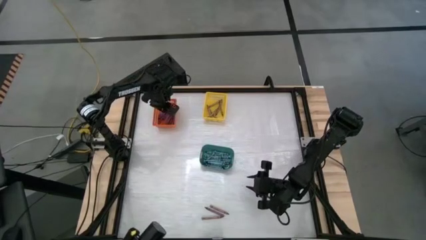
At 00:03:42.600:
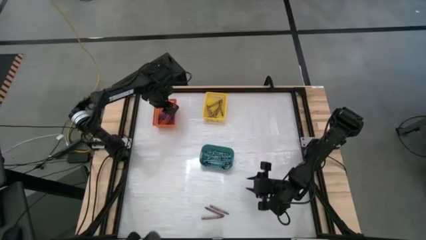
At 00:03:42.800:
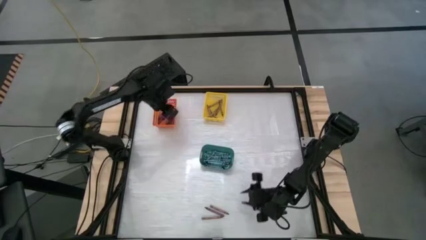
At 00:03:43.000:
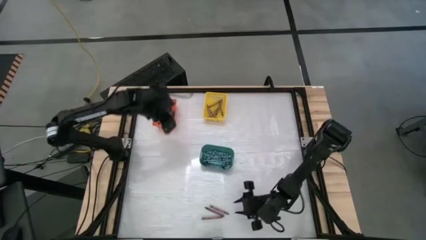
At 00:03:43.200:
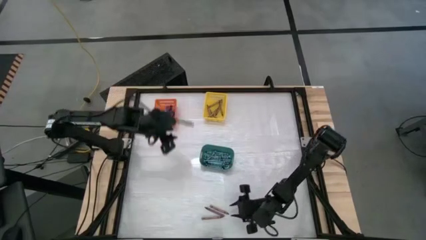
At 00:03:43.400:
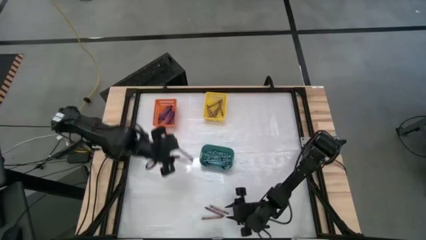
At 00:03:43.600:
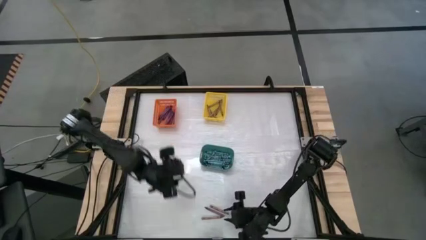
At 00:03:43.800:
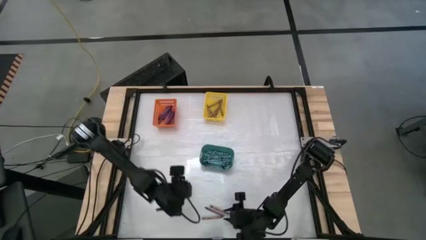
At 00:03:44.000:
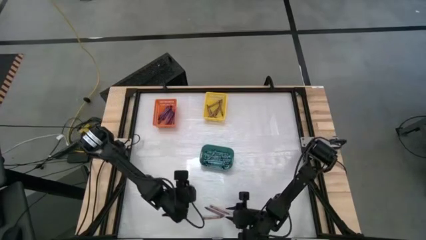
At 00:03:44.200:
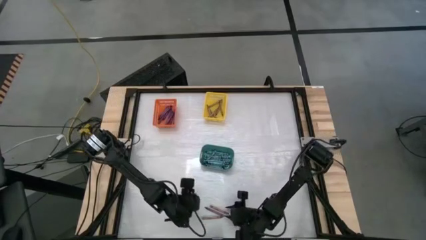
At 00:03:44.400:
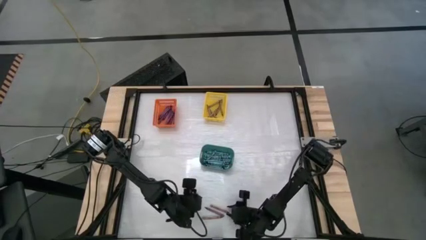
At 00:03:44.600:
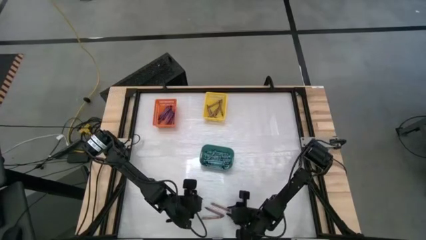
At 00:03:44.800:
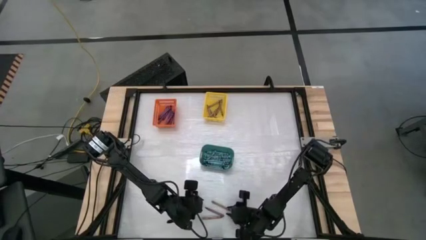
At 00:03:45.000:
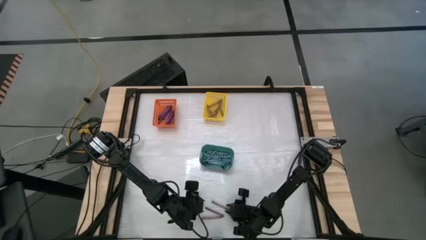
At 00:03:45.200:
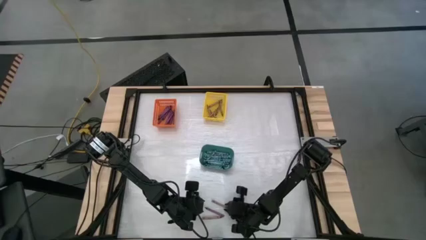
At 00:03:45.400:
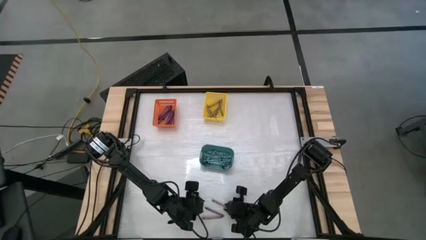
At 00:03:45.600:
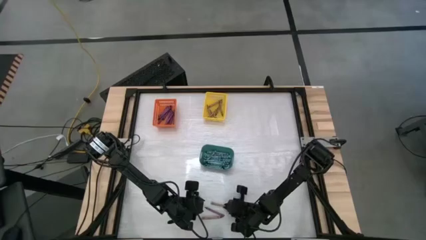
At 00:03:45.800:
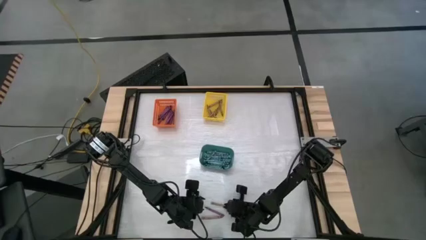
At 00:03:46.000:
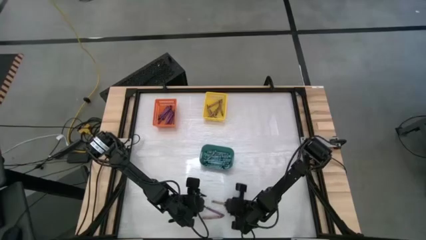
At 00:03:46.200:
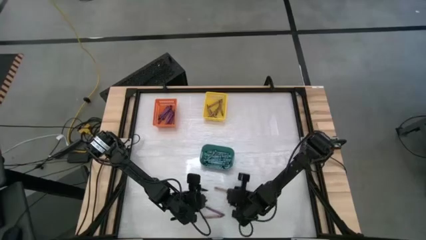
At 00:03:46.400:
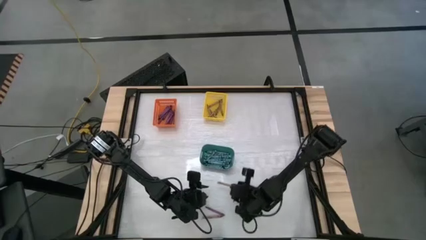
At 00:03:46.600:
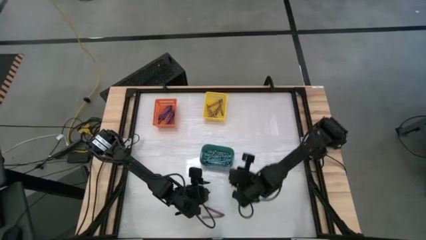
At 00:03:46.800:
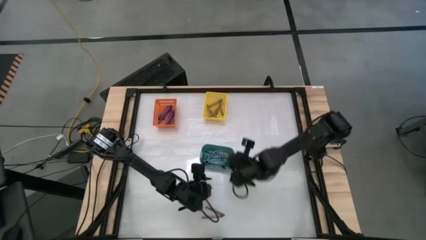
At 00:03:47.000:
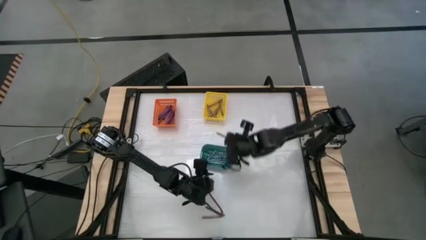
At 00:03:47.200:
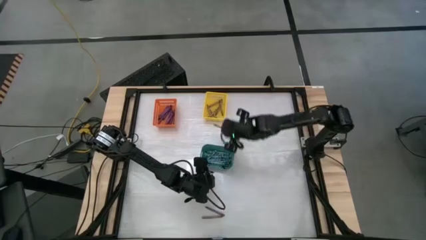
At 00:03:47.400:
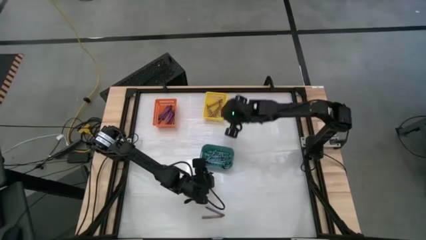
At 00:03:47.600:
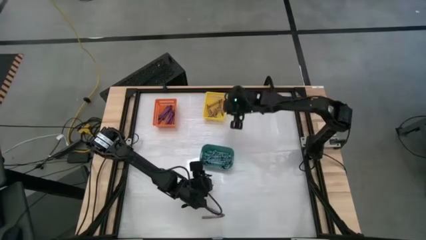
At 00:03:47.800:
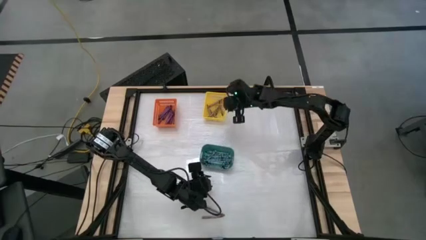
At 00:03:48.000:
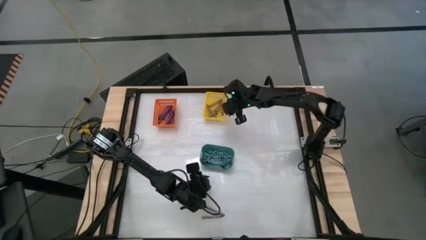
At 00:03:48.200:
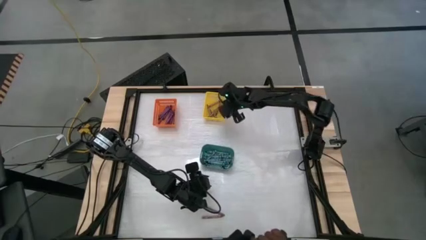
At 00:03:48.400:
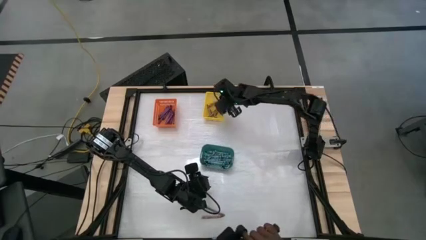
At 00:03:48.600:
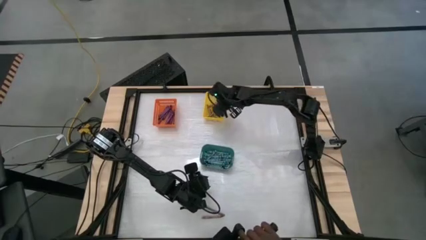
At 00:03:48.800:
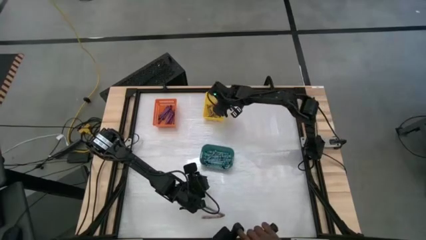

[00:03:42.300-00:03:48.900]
Task: Sort crayons
Put the brown crayon into the yellow bin

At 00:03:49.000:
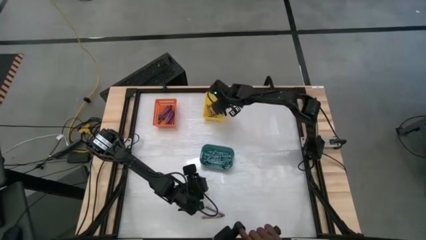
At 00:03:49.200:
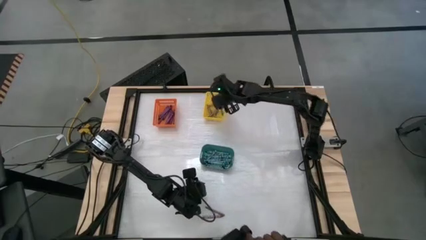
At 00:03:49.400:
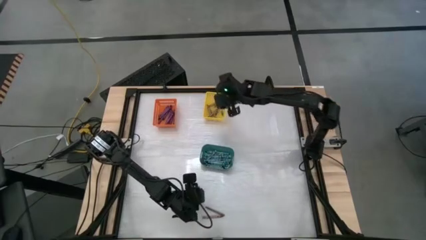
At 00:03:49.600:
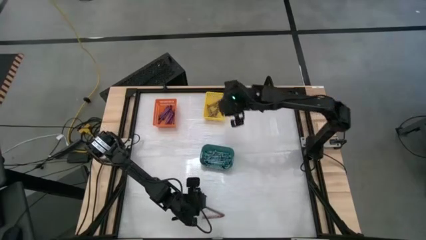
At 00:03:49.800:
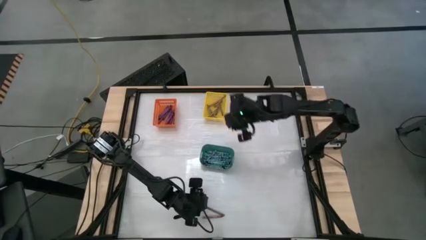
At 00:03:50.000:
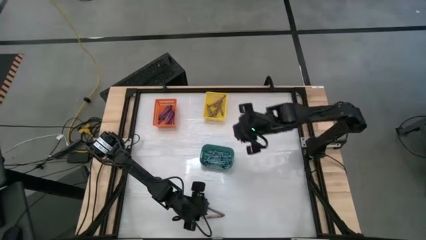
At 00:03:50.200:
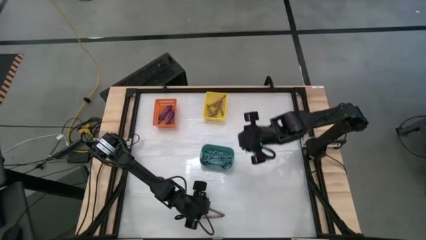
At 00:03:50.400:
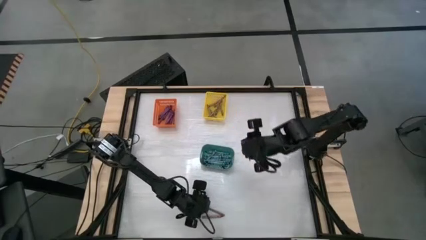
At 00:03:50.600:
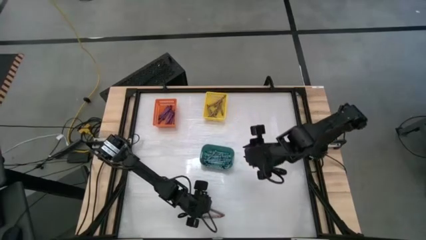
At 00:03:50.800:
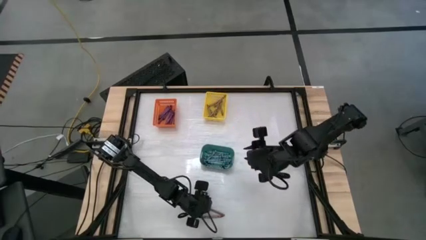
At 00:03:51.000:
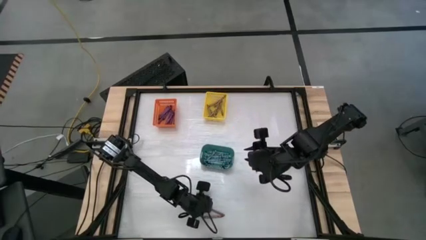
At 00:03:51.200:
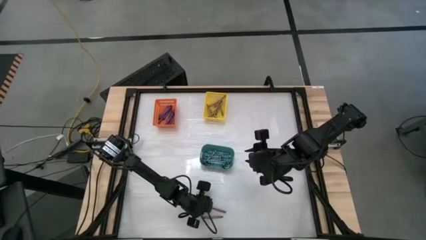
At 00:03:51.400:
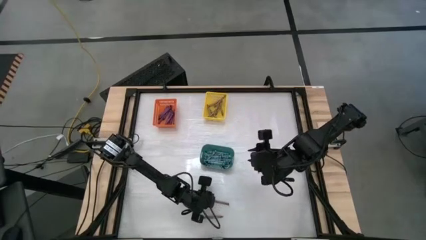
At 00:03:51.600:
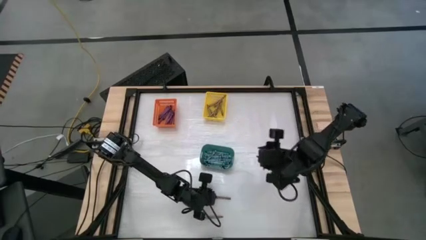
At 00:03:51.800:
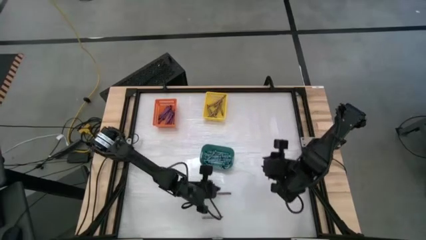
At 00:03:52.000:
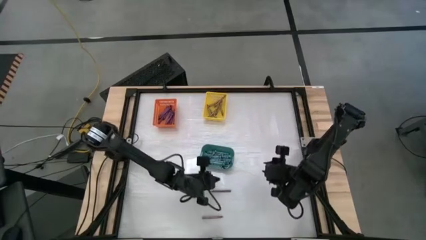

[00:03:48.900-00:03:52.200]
Put the violet crayon into the orange bin

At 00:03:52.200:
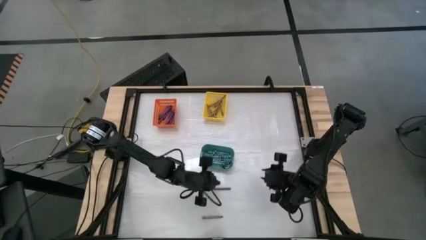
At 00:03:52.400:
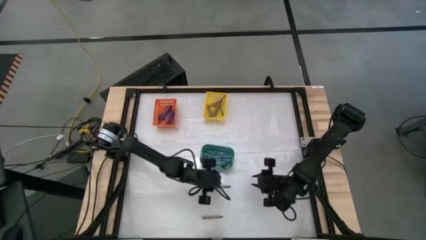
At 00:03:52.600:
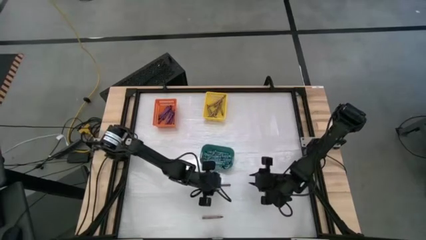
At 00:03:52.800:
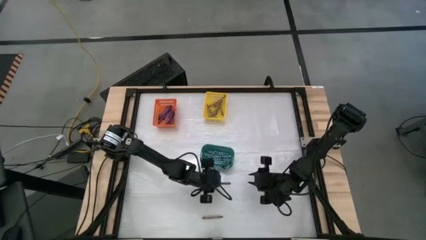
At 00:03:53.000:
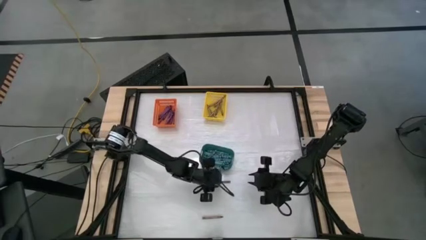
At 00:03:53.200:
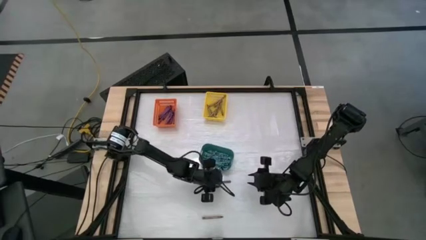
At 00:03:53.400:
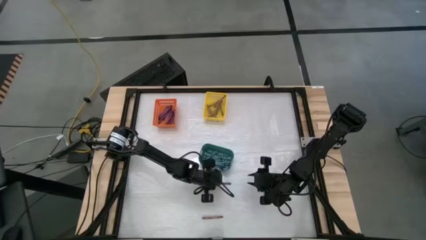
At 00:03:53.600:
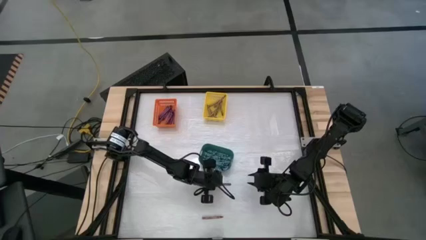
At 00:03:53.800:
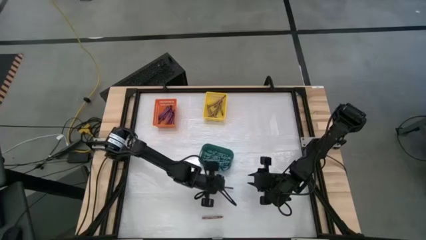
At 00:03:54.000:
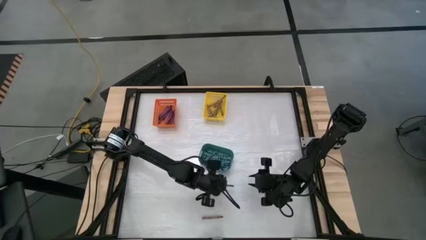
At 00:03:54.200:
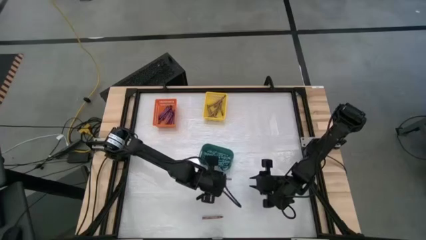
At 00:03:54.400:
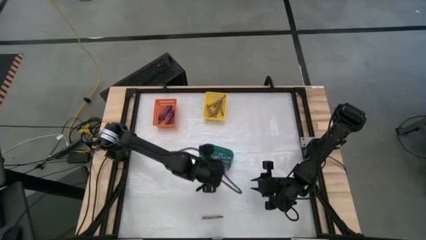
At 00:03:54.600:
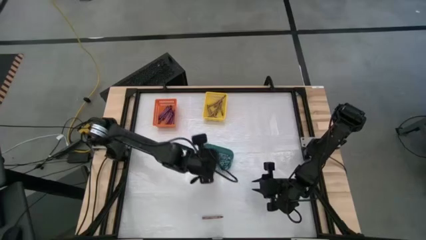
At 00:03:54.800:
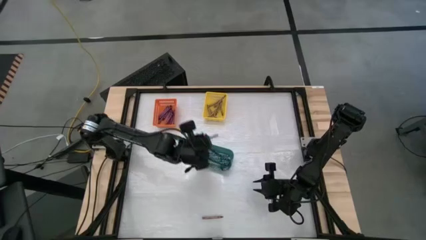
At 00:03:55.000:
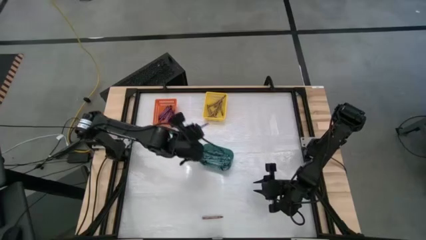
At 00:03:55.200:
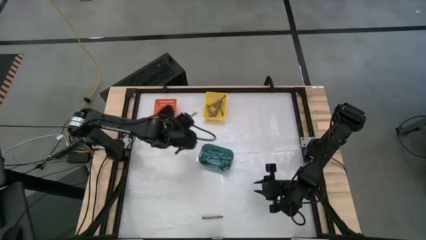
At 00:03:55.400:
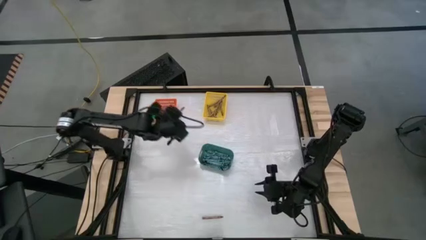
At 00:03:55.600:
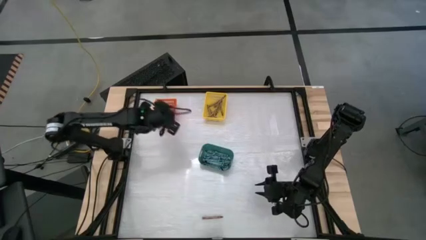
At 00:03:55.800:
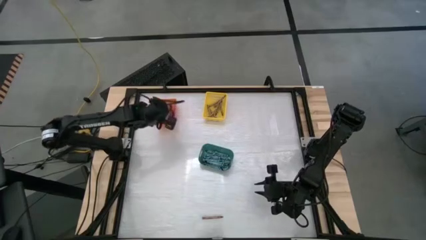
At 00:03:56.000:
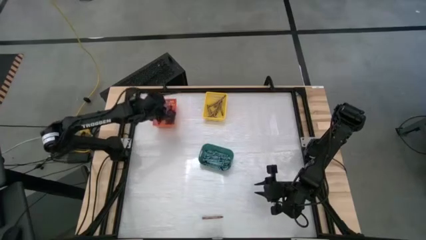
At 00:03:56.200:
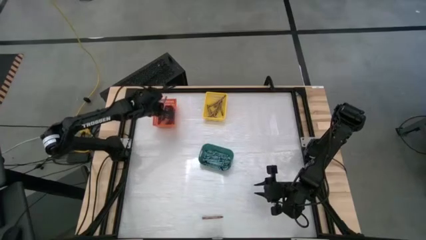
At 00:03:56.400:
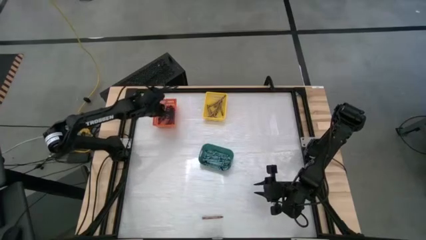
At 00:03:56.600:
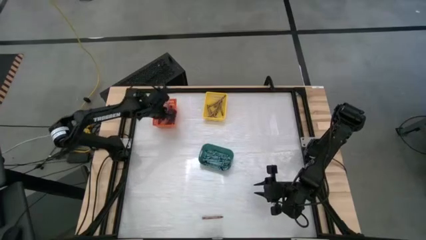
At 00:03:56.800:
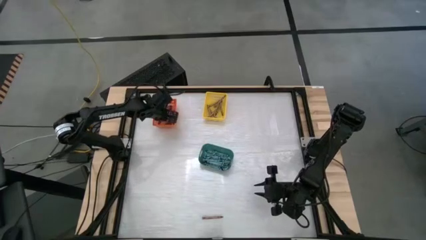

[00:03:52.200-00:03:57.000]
Put the violet crayon into the orange bin

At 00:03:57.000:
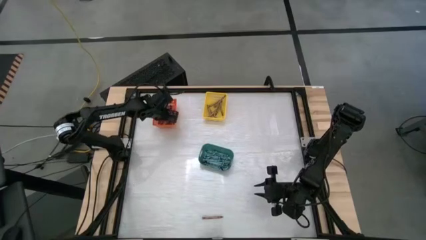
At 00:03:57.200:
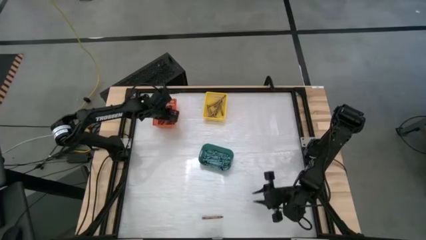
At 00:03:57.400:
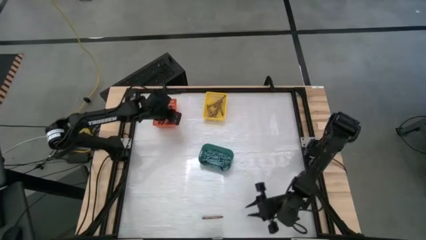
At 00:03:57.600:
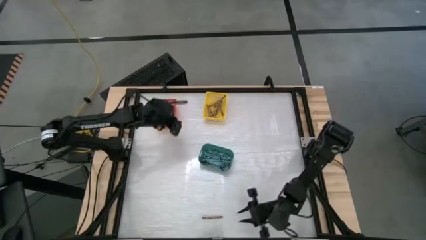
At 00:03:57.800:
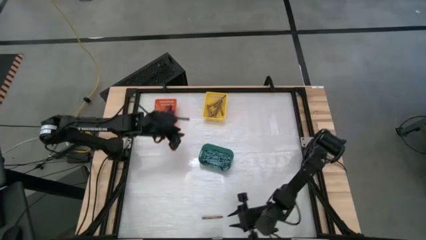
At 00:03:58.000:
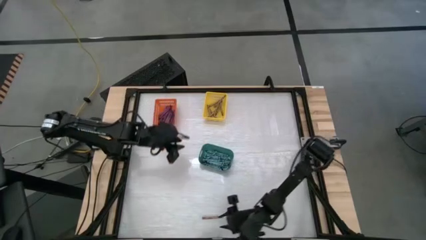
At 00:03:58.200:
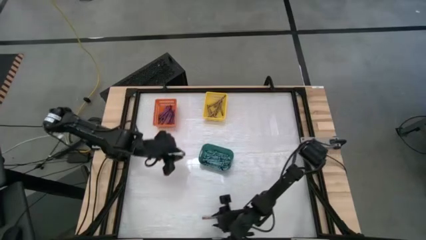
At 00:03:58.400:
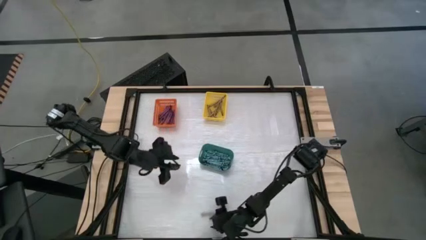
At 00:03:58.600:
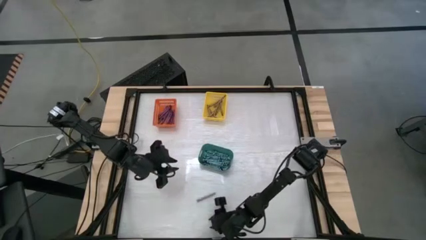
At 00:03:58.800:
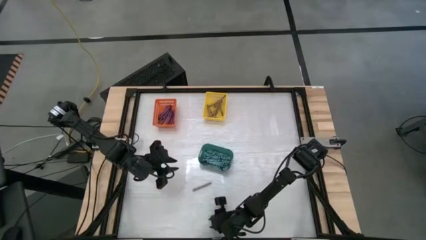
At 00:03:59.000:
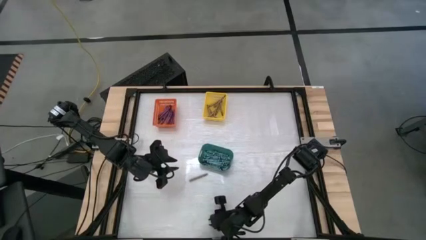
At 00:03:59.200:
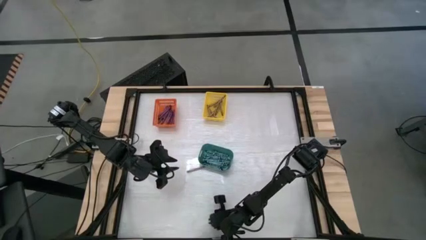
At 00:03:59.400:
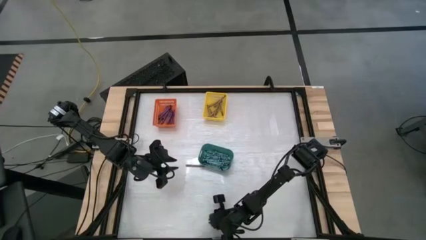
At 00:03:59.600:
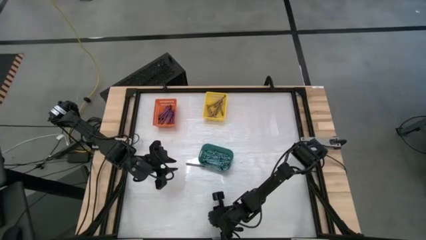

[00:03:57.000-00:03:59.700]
Put the brown crayon into the yellow bin
